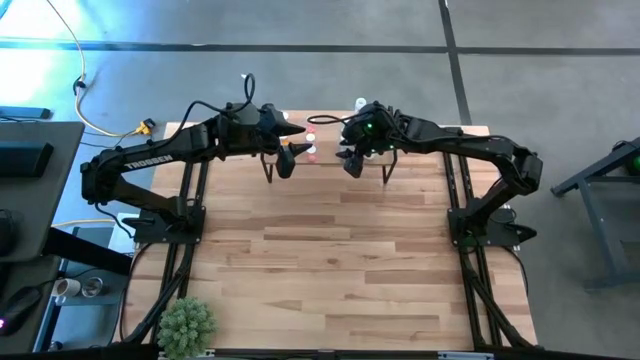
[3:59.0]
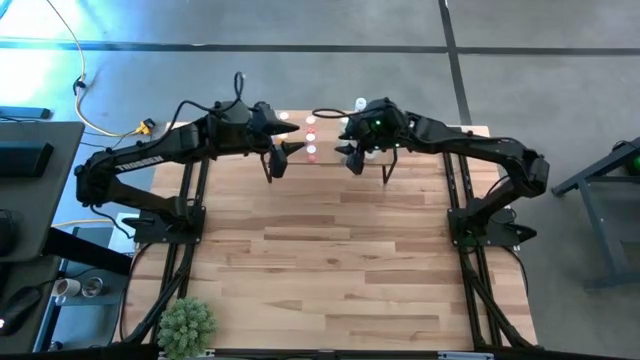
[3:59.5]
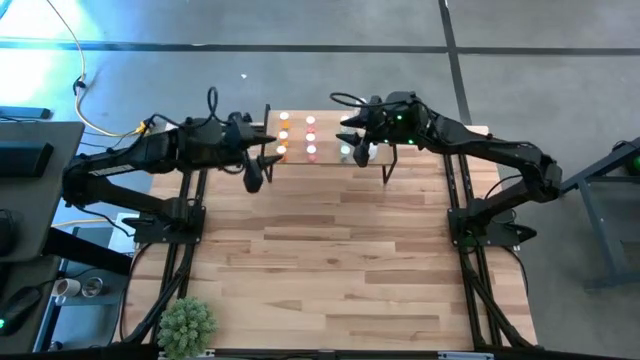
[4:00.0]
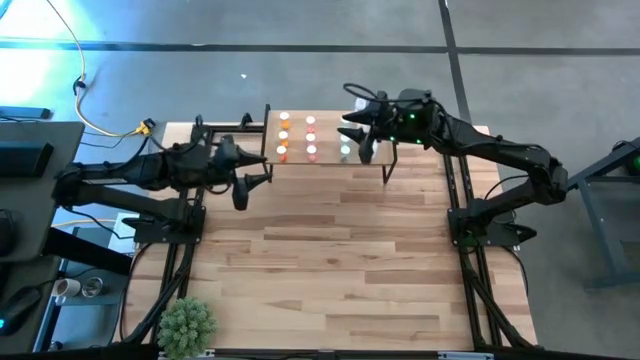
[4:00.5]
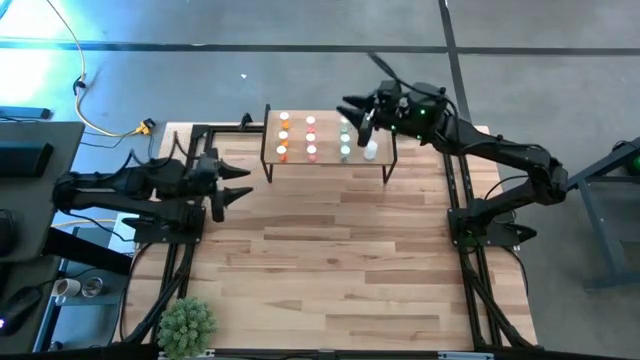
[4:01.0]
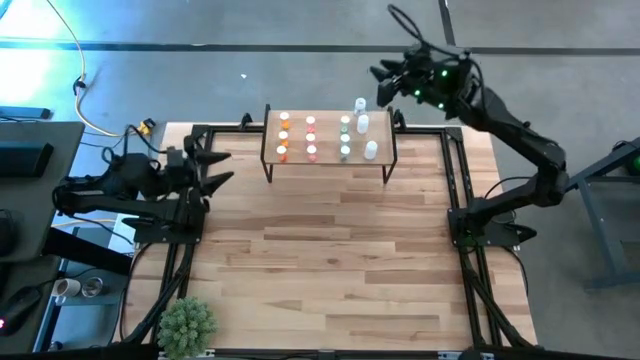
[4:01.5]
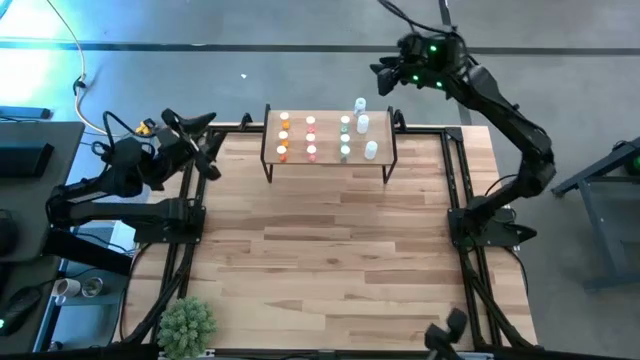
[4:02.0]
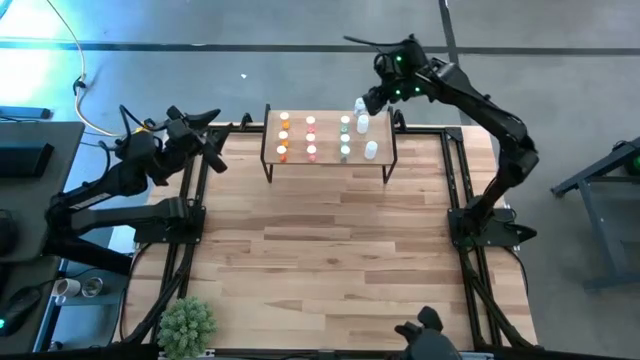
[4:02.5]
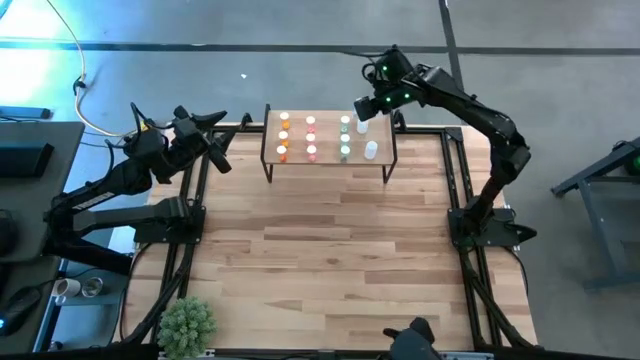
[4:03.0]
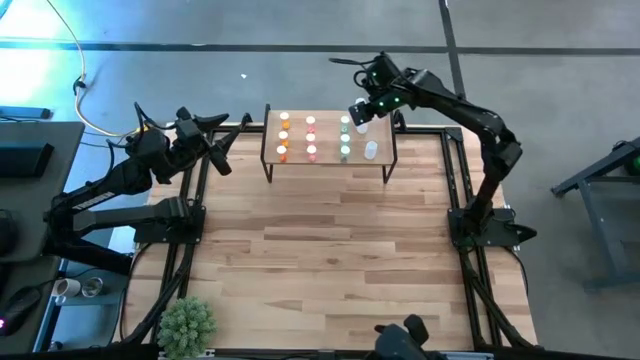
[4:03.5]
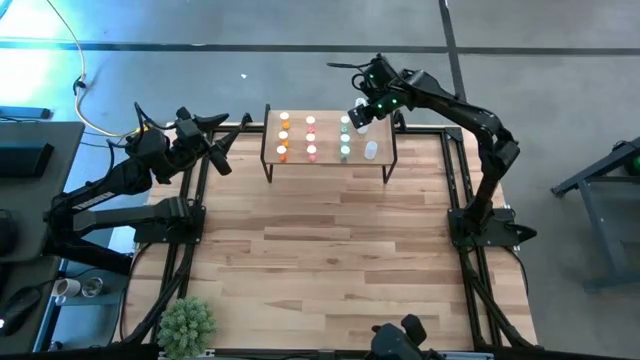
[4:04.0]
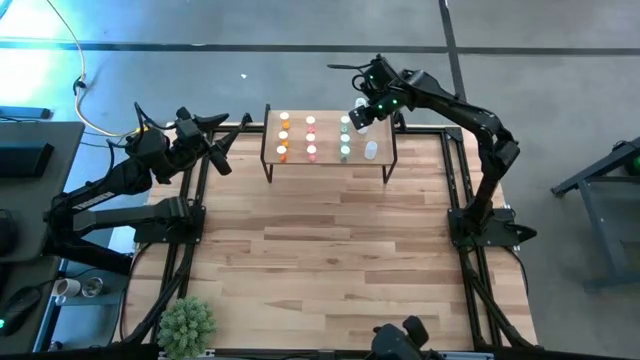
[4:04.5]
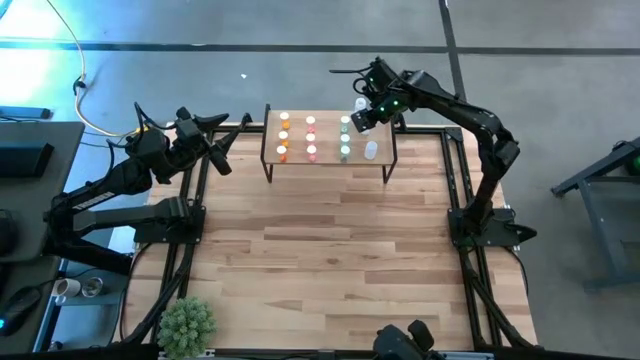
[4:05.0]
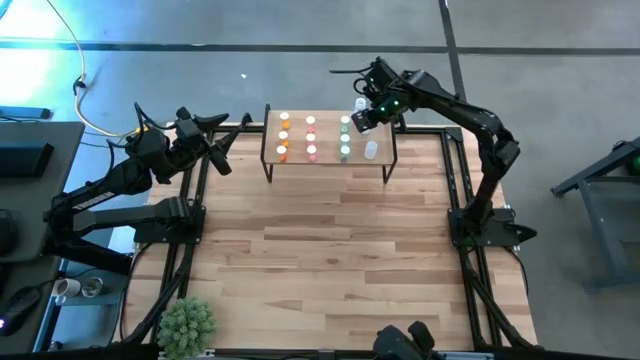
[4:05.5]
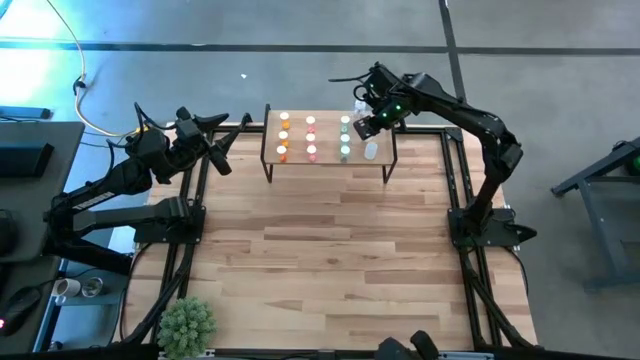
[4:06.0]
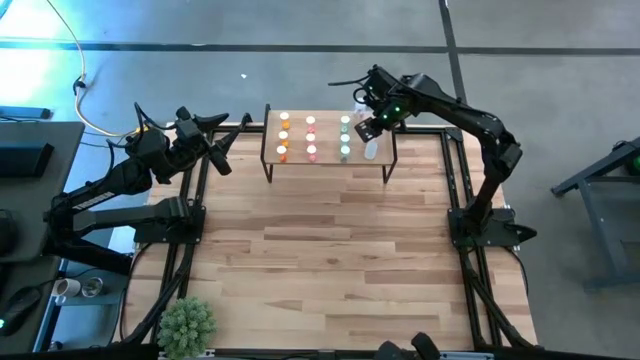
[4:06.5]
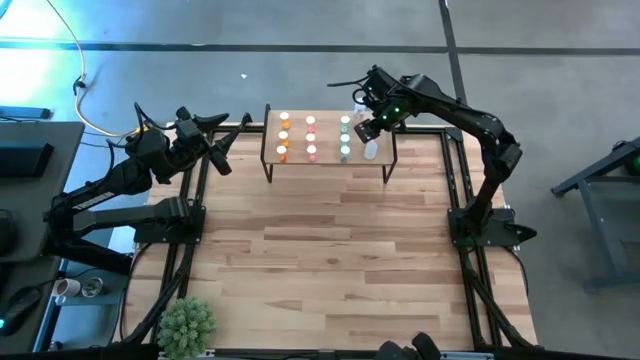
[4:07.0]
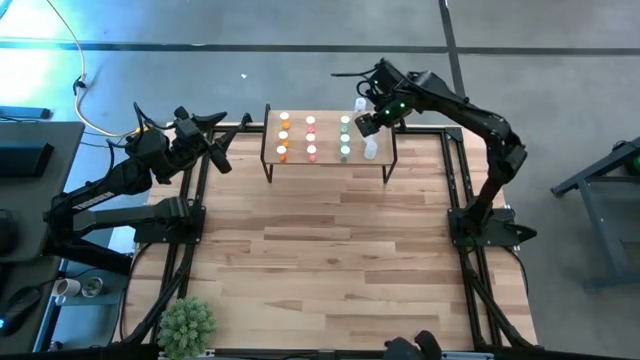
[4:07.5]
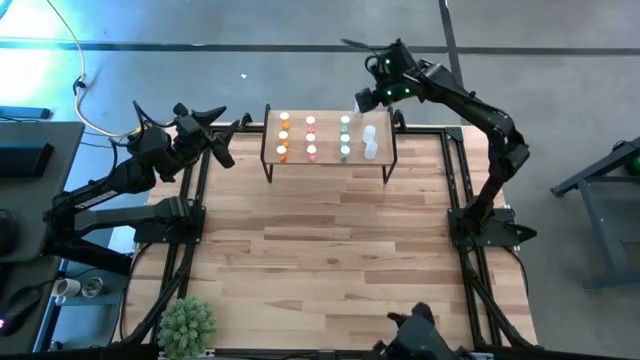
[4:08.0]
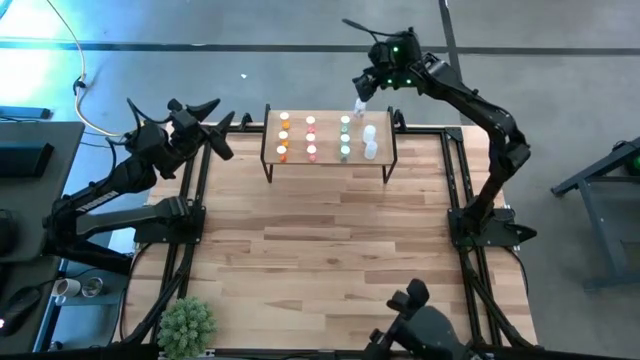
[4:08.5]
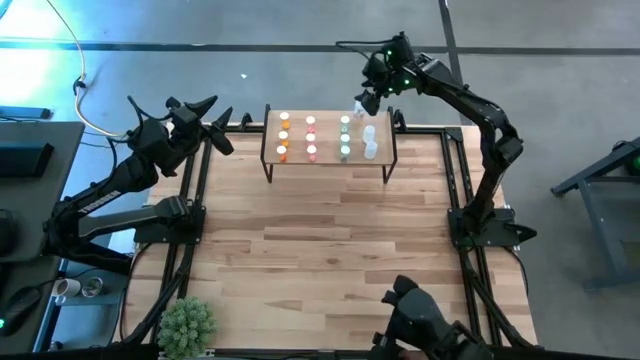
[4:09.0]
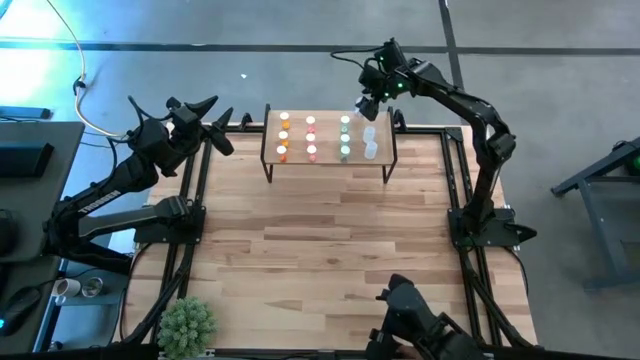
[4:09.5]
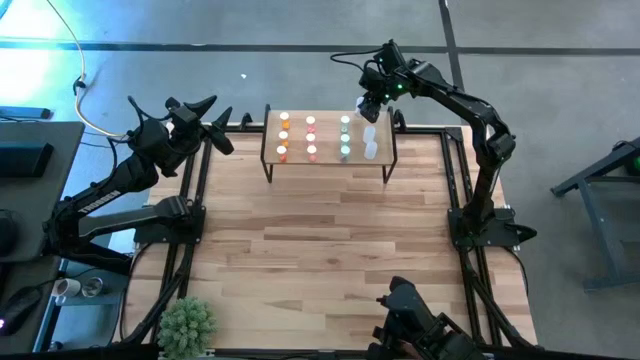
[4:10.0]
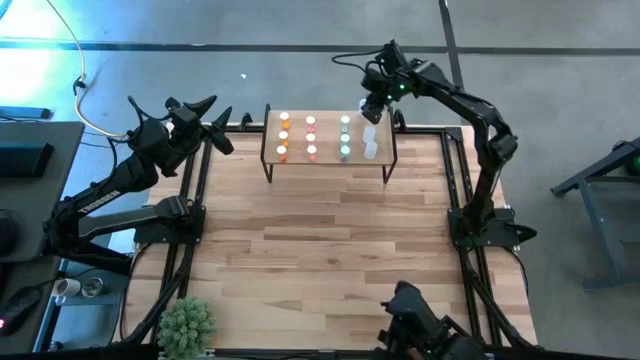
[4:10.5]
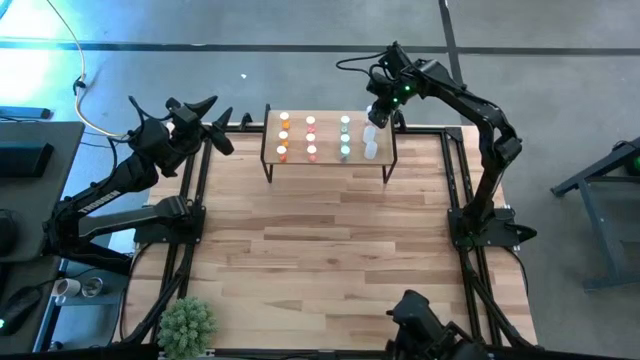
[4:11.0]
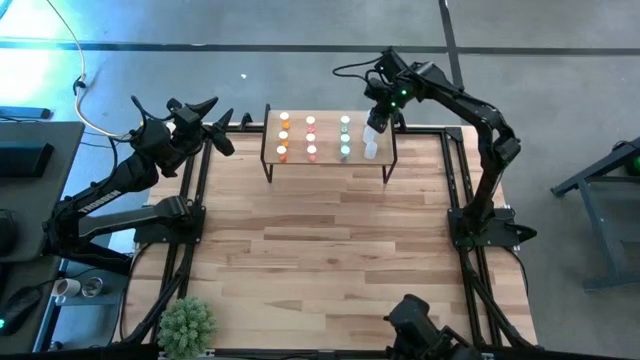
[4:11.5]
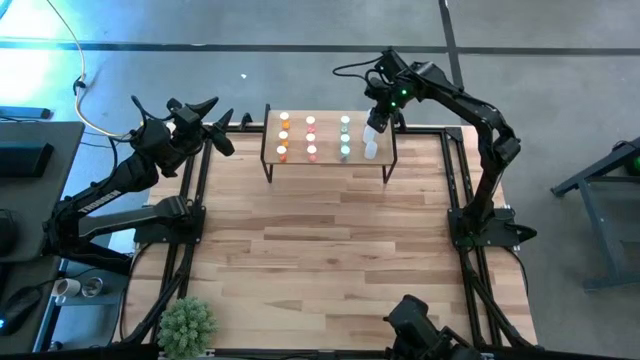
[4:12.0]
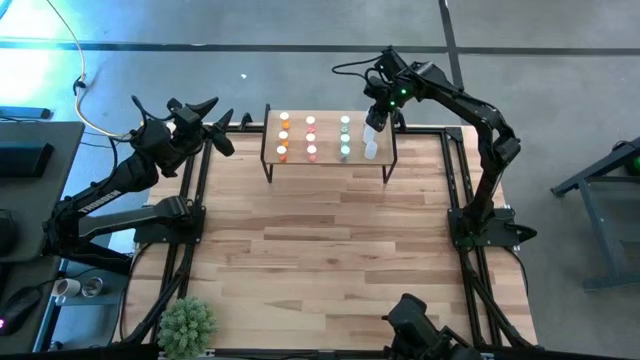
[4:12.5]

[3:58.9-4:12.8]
Task: Pick and place medicine bottles onto shelf by color
Adjust the transparent pill bottles on the shelf

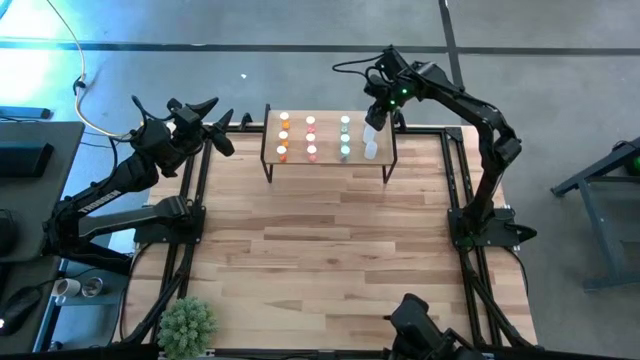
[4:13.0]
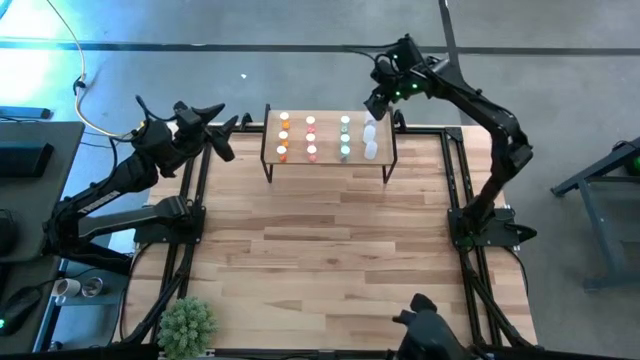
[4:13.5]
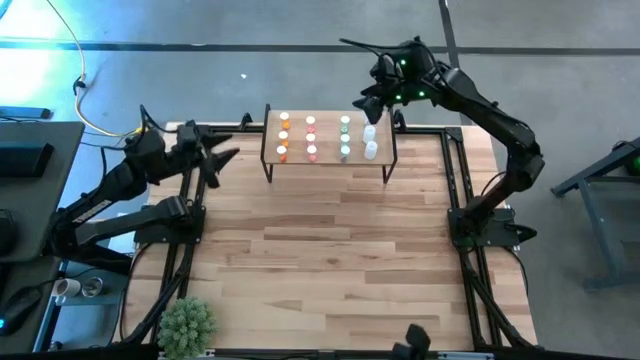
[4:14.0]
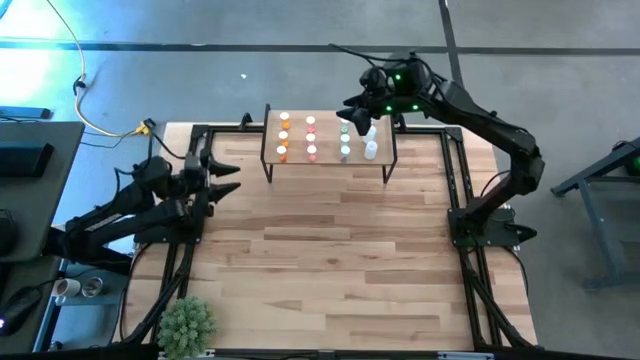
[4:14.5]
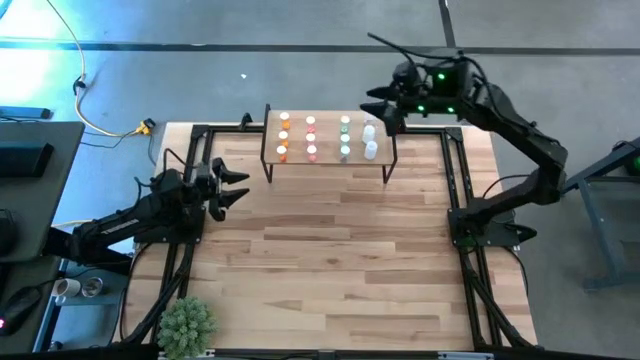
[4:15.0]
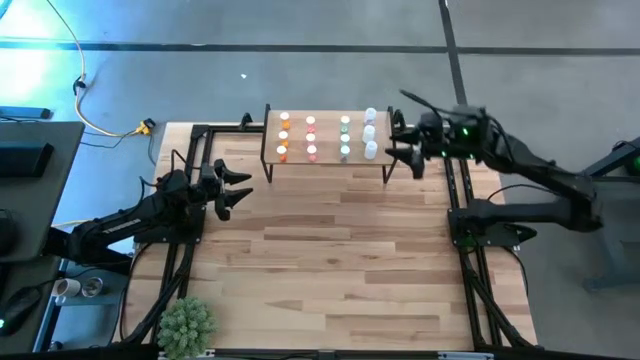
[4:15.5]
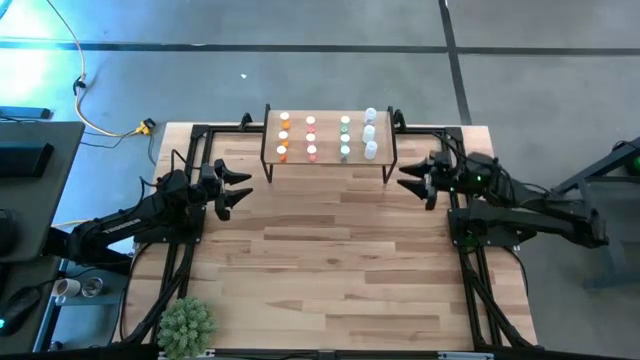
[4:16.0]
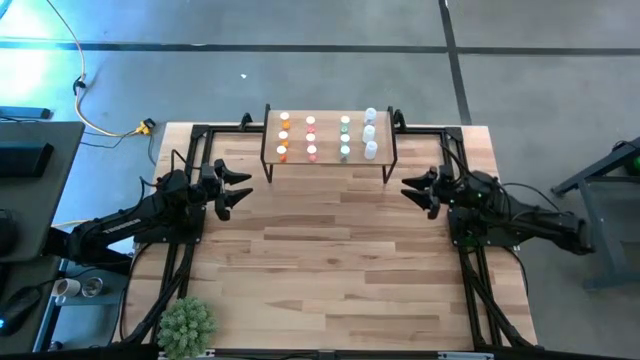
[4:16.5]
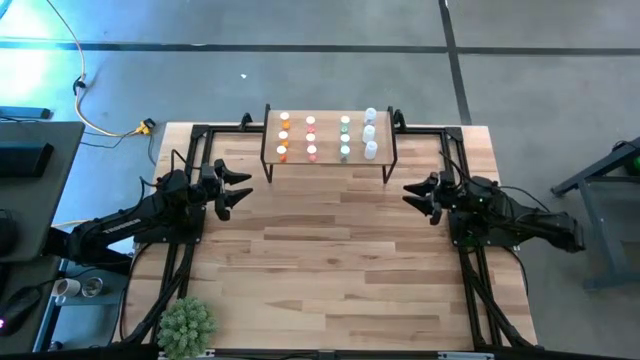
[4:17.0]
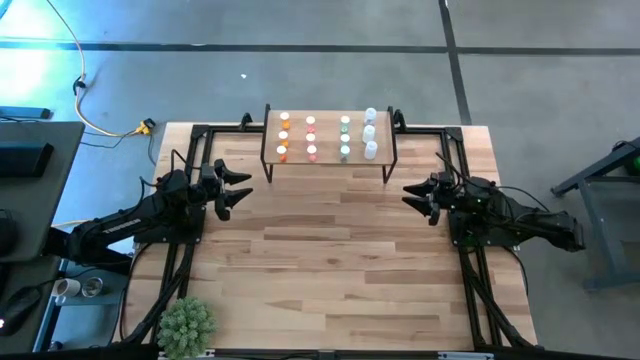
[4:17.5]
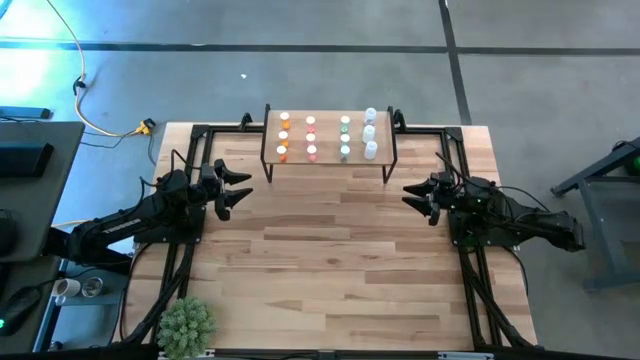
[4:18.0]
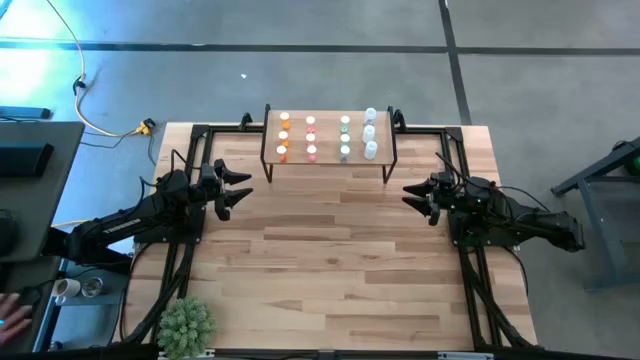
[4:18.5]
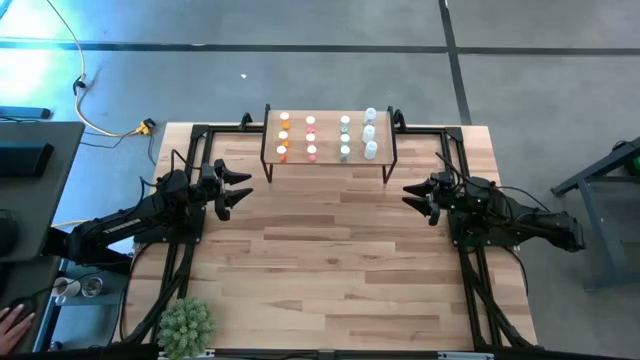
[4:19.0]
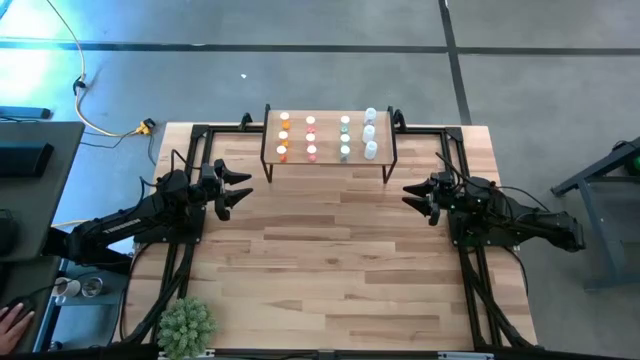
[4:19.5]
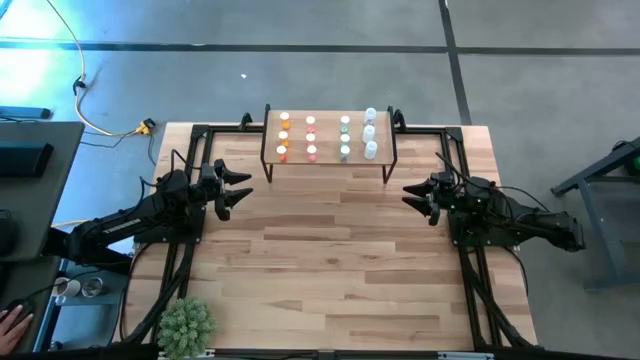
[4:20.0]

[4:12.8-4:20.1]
Return to Home Position

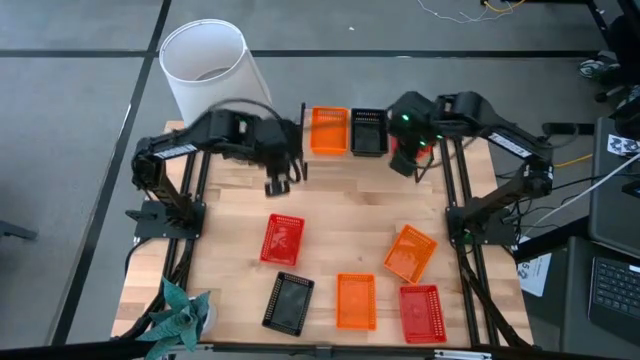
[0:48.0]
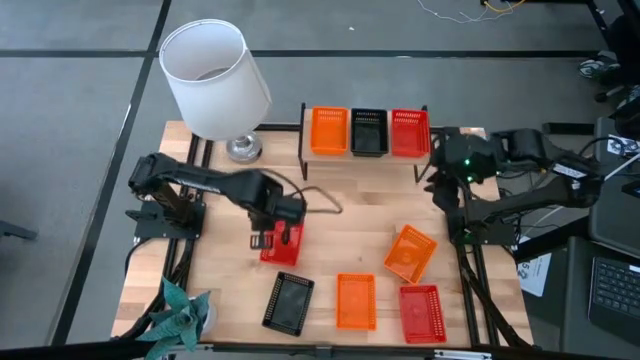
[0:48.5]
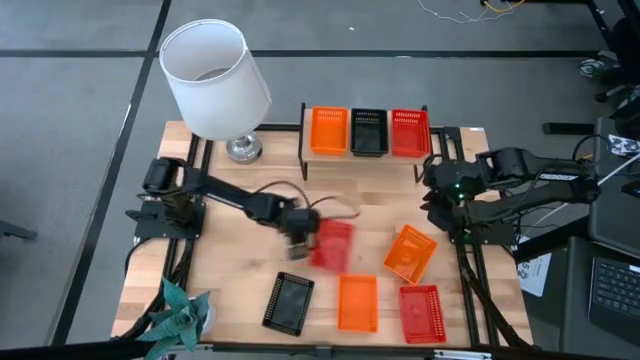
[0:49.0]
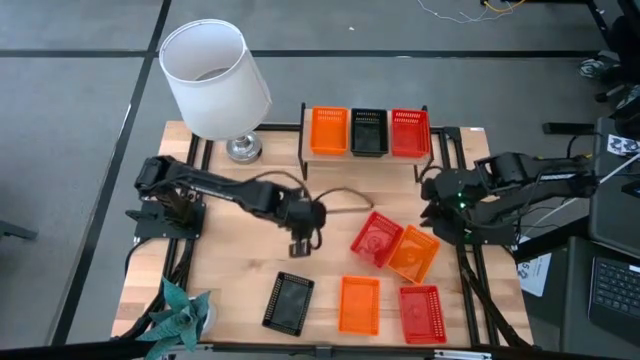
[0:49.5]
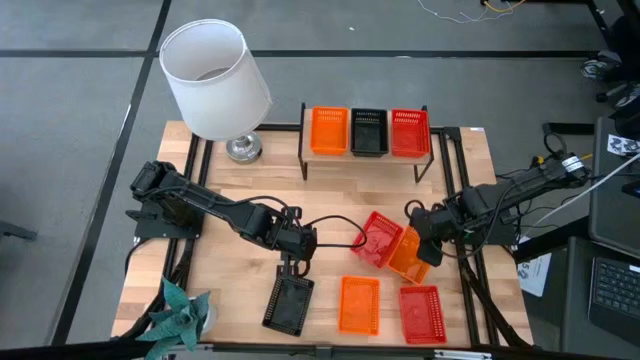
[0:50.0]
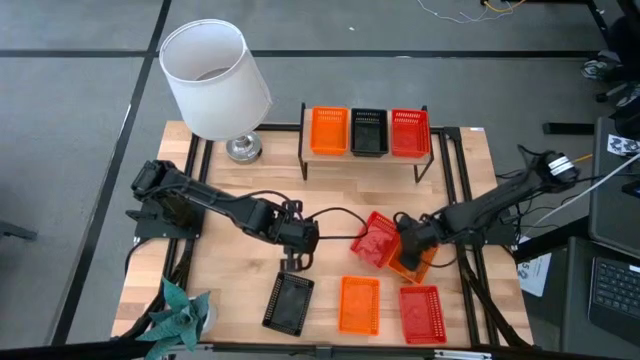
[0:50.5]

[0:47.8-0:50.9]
Task: Stack baskets on shelf by color
Adjust the orange bin
